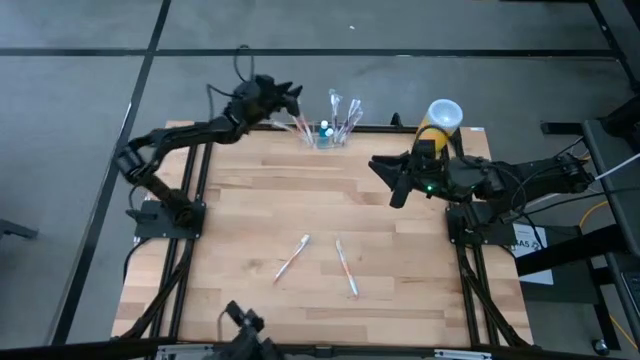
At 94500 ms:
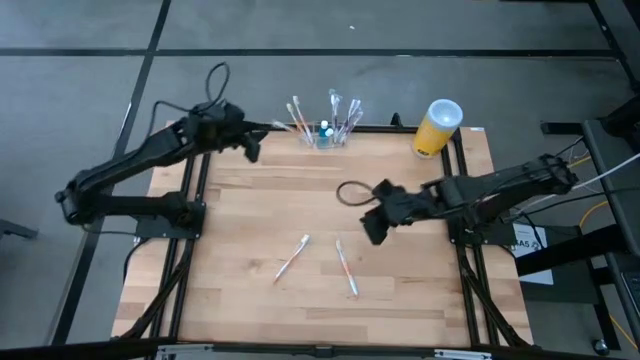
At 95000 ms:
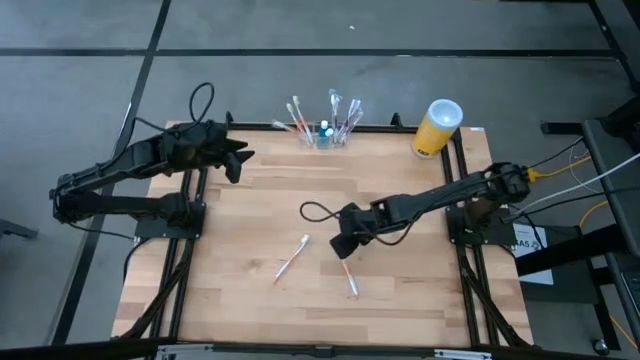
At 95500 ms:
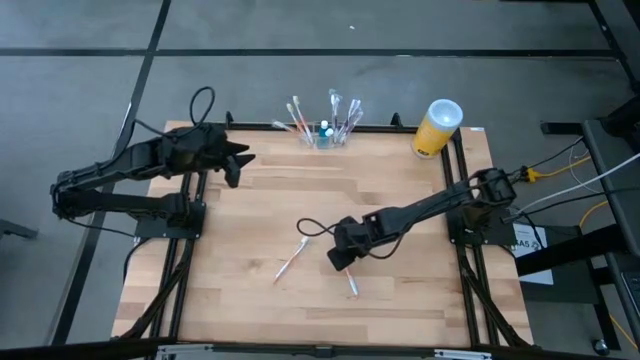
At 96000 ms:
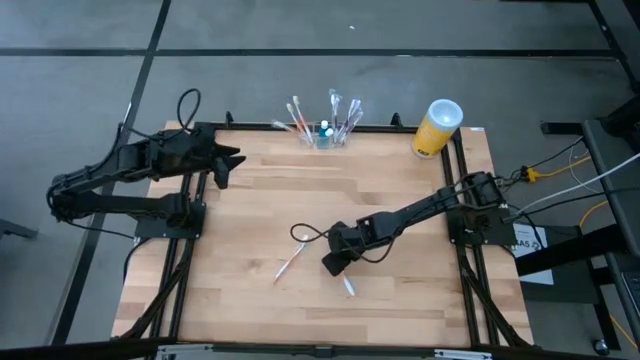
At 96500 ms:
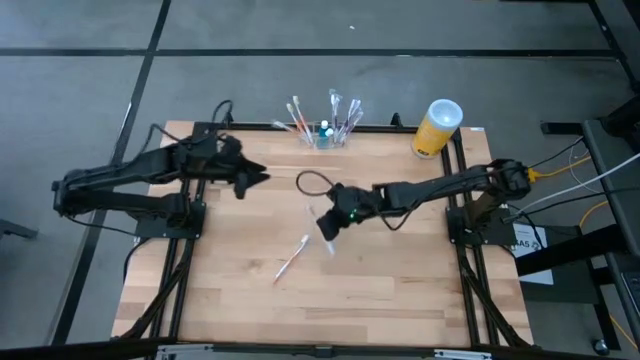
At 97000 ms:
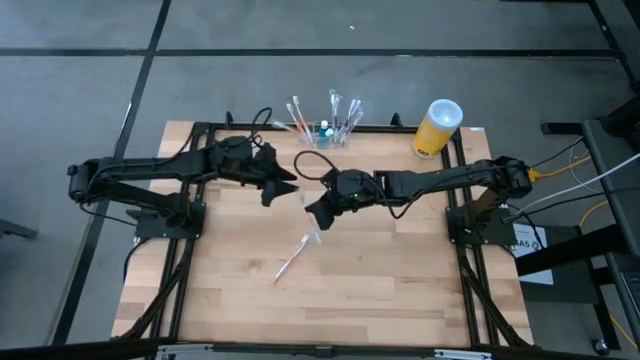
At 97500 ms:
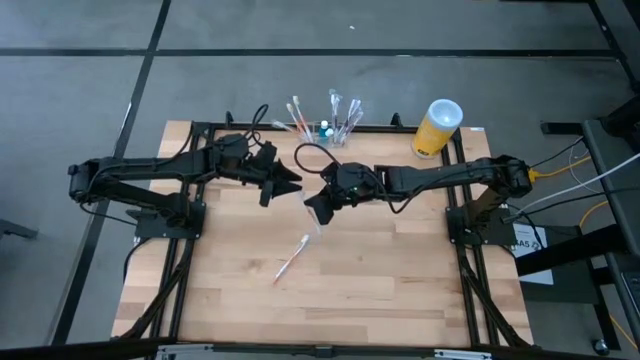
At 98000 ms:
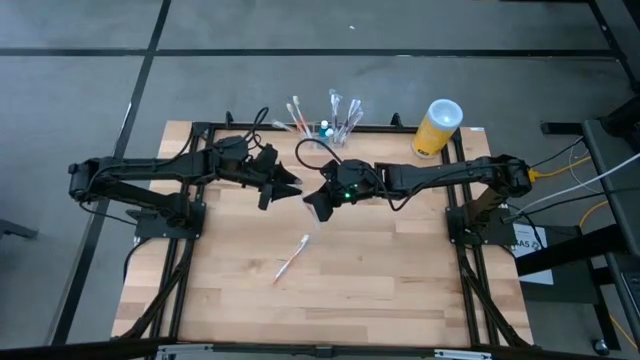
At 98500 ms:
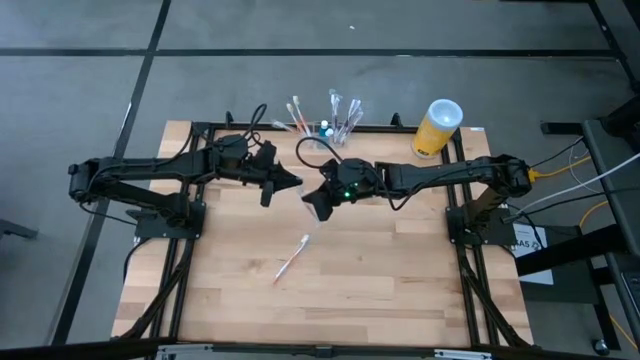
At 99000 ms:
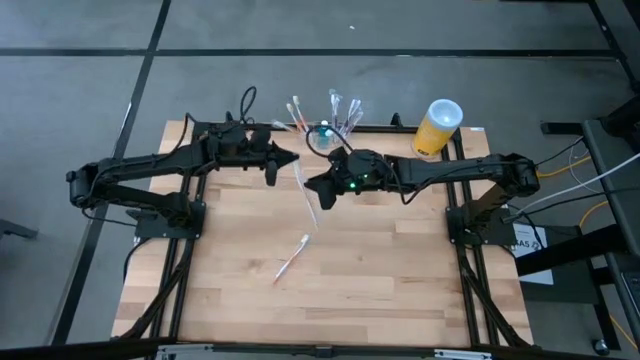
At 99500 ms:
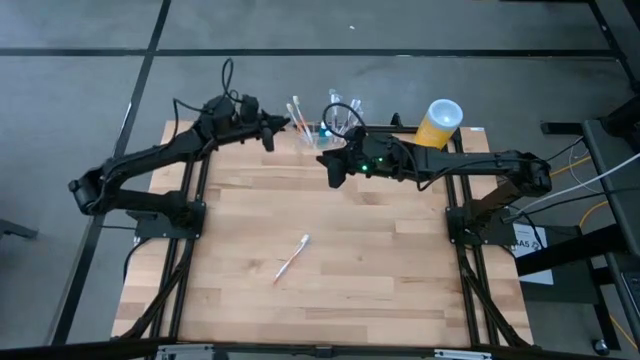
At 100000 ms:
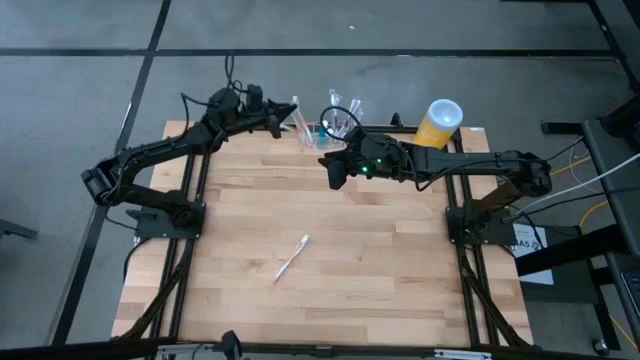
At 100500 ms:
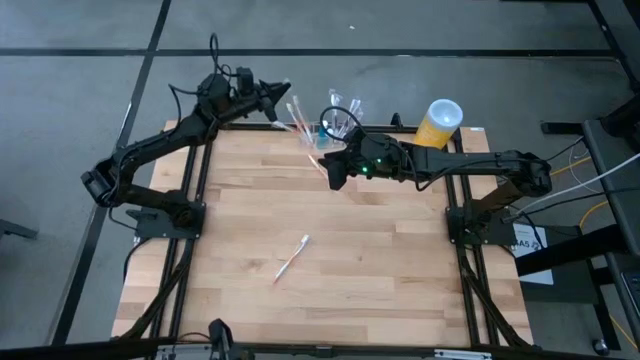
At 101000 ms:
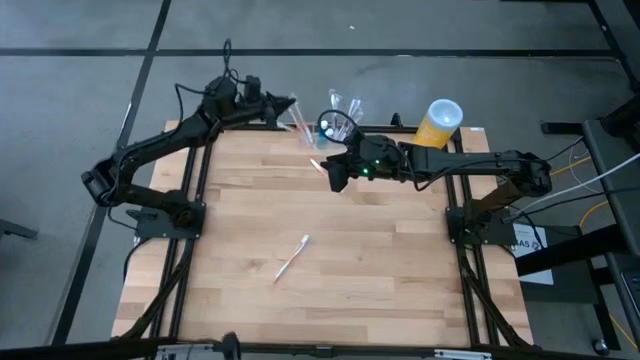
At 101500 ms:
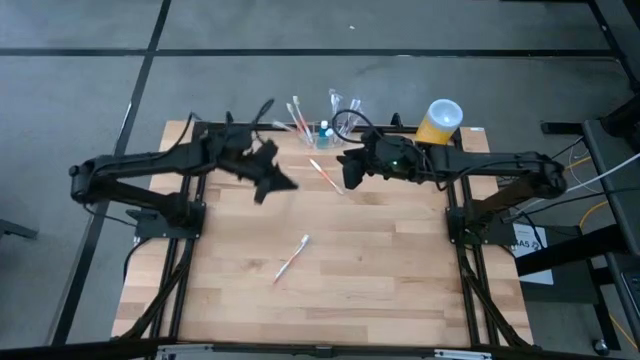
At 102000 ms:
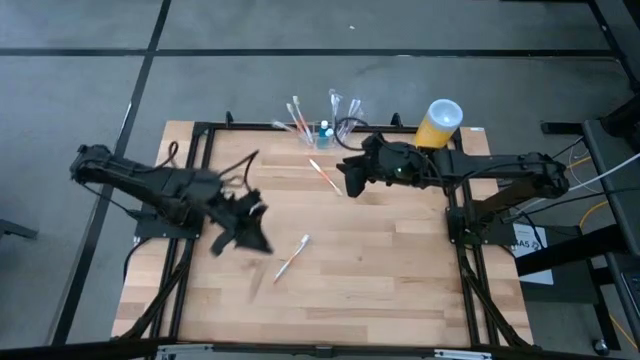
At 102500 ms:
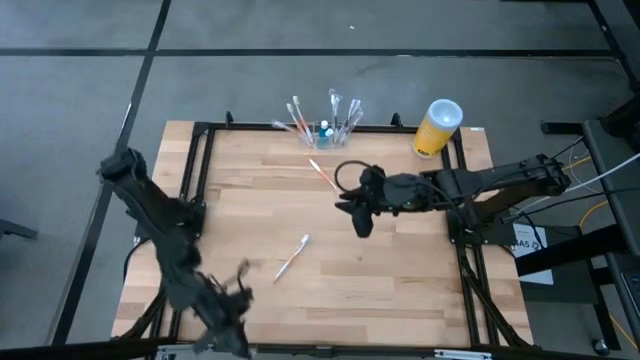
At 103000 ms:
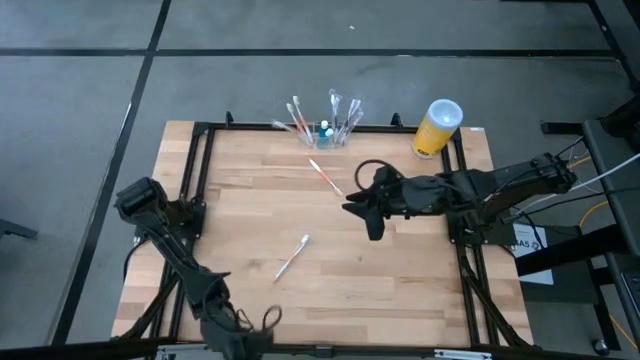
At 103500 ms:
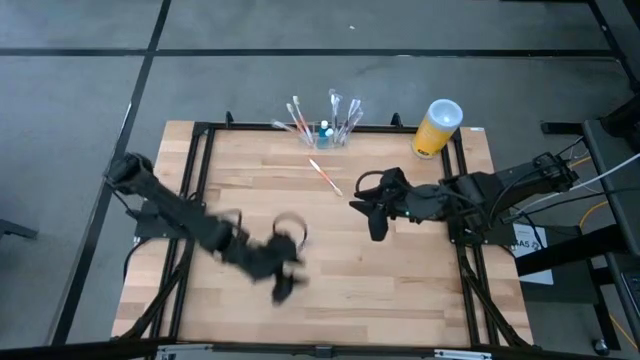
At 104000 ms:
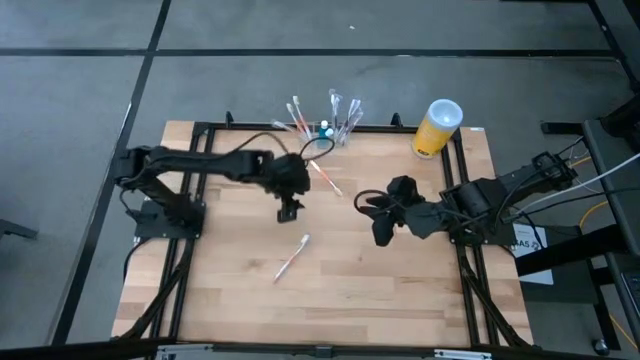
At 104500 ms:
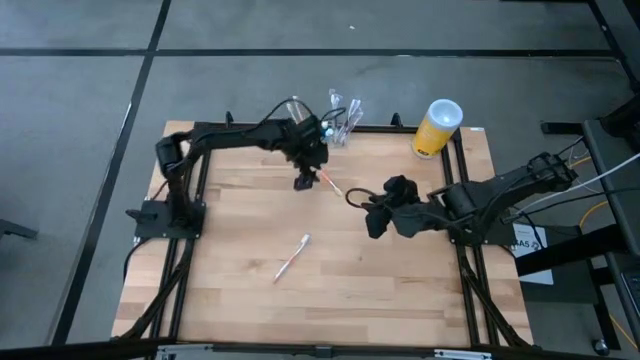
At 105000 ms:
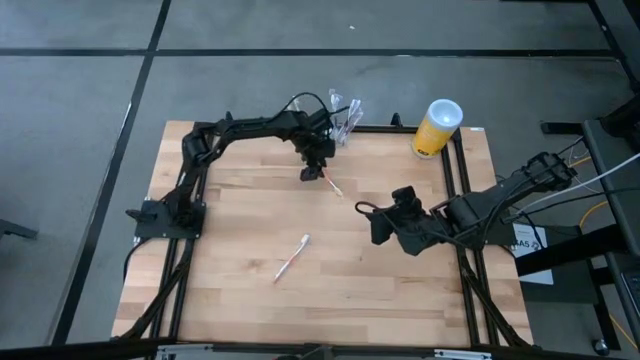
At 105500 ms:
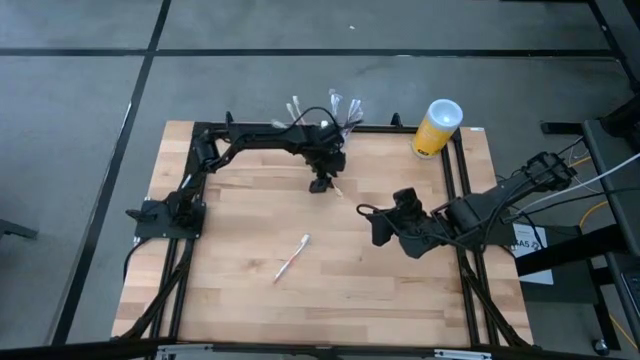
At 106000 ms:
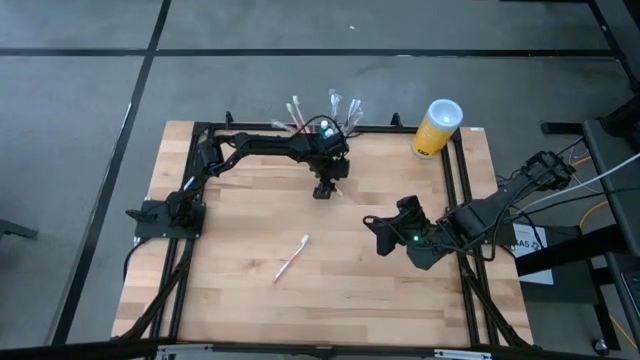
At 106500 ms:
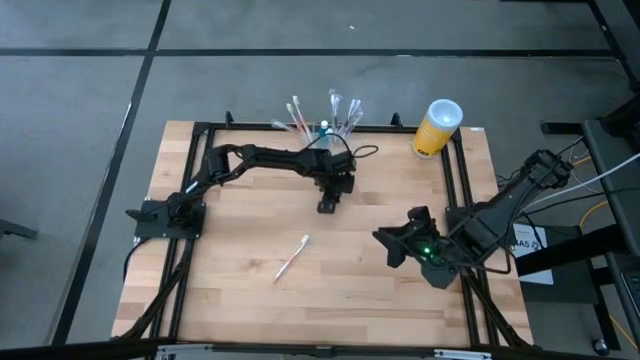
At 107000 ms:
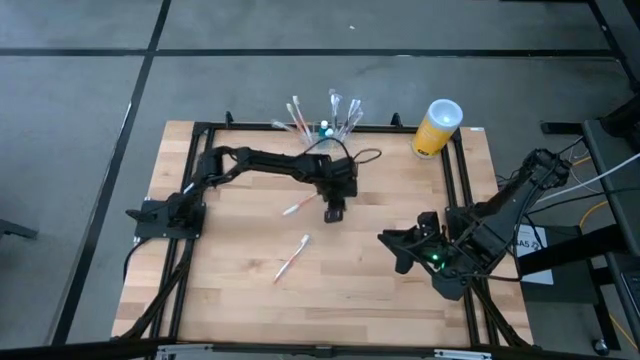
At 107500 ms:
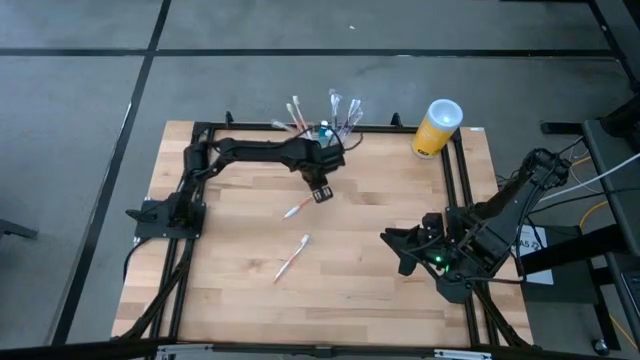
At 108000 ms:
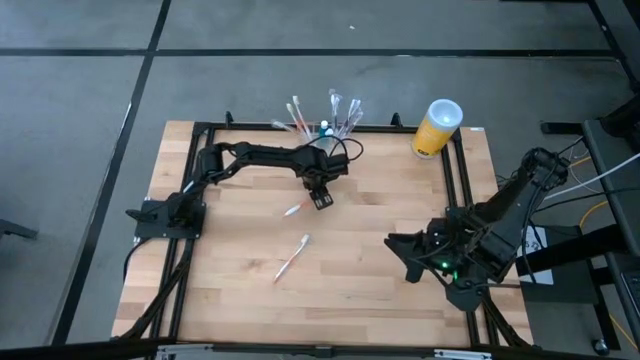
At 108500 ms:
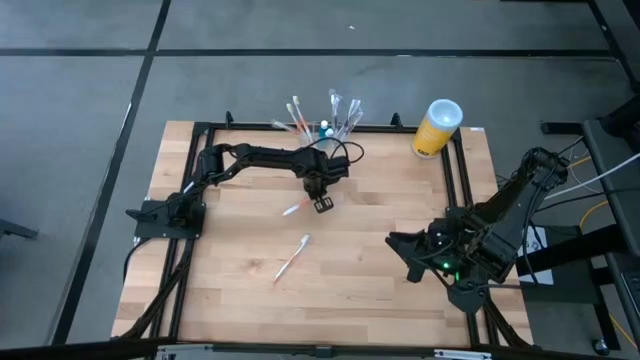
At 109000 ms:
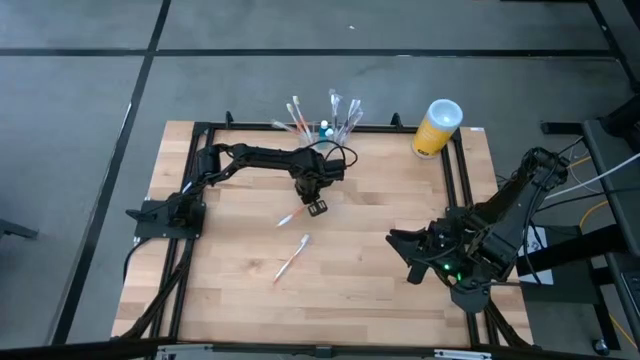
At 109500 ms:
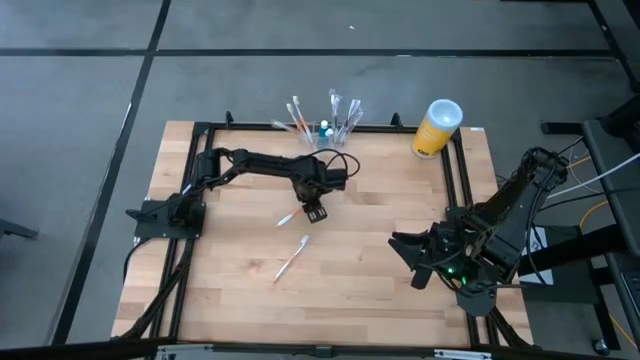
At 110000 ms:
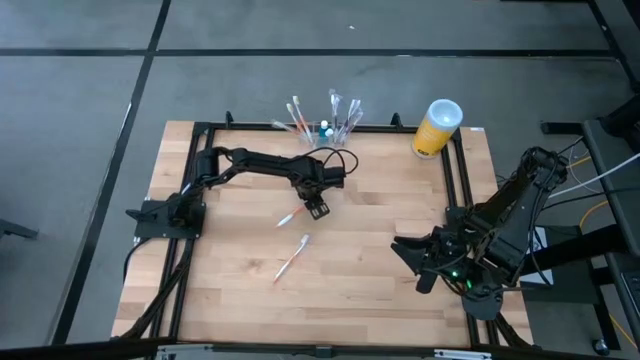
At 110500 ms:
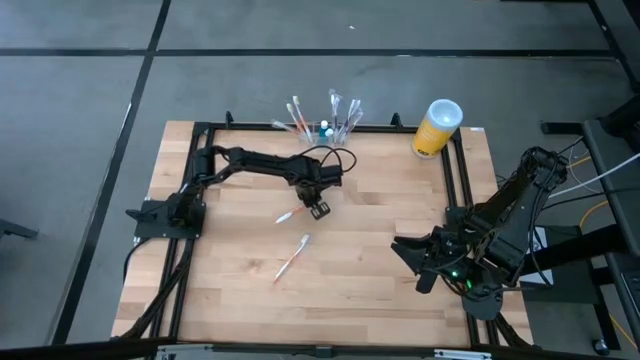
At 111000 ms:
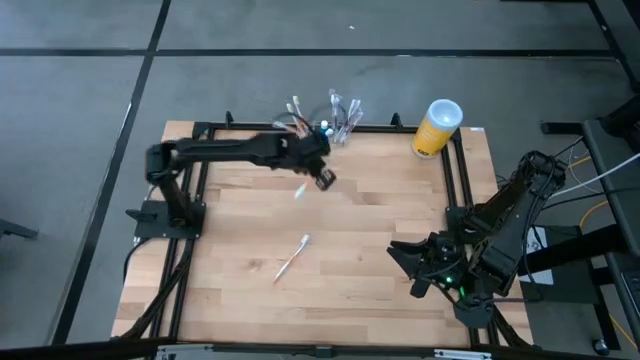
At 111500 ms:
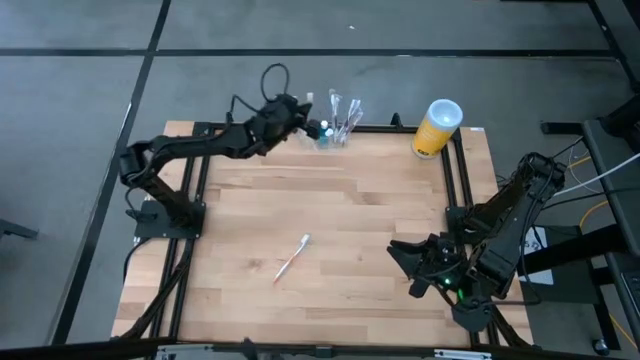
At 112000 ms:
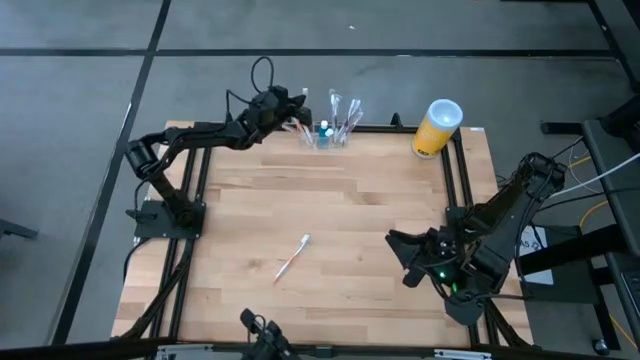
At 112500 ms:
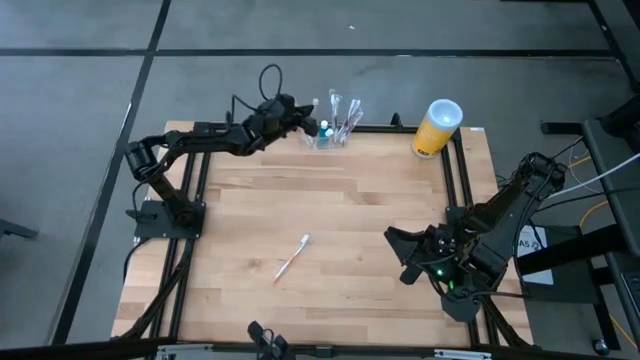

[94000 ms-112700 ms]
Task: Pick & Place toothbrushing station
Put the orange toothbrush into the transparent organizer

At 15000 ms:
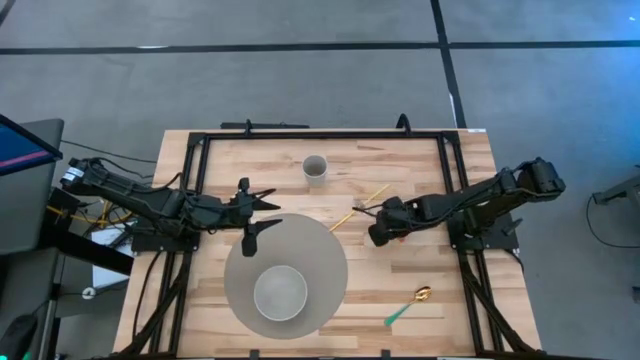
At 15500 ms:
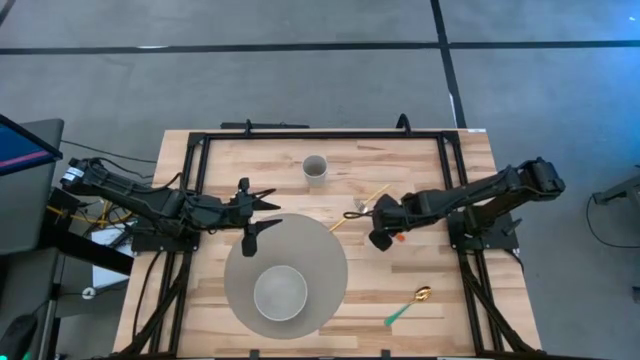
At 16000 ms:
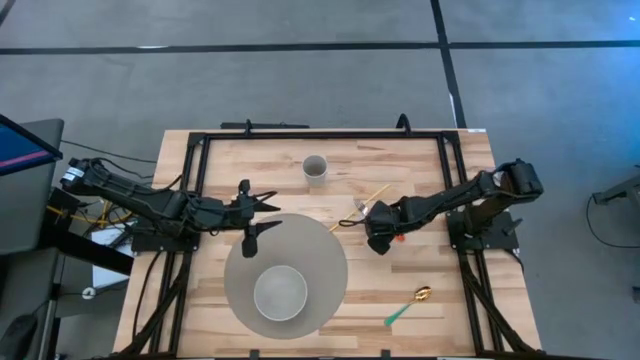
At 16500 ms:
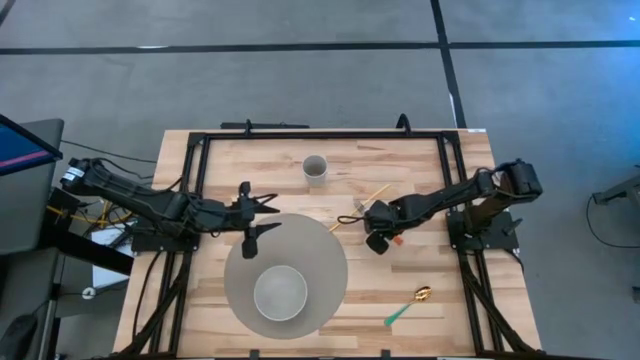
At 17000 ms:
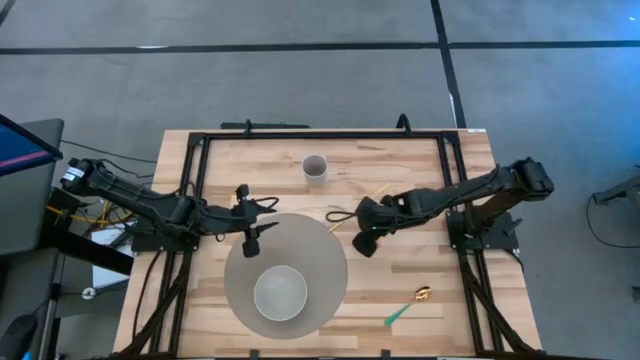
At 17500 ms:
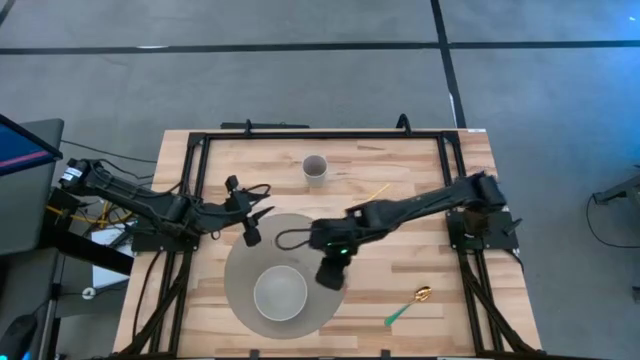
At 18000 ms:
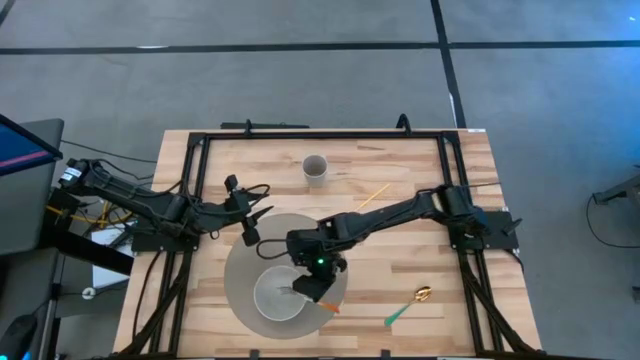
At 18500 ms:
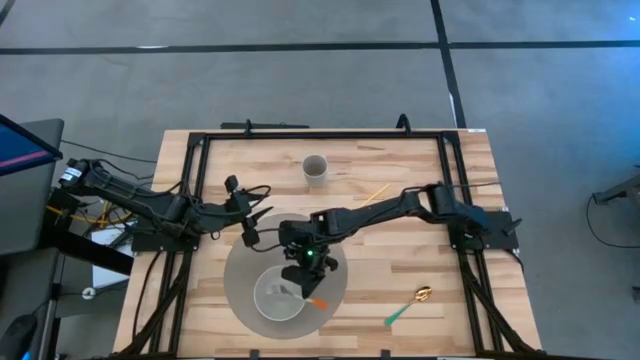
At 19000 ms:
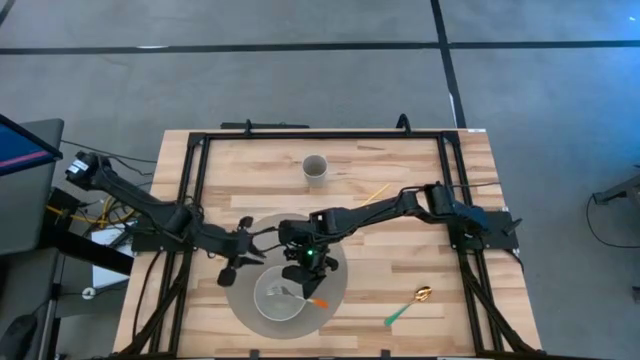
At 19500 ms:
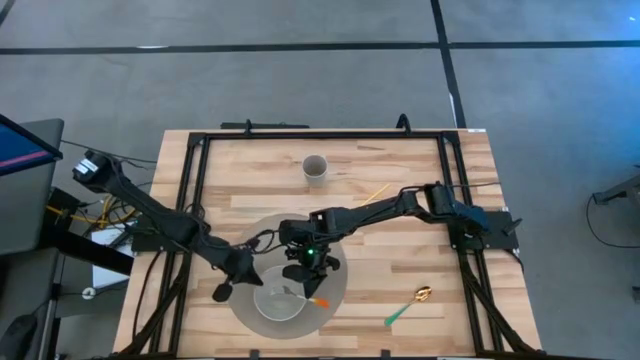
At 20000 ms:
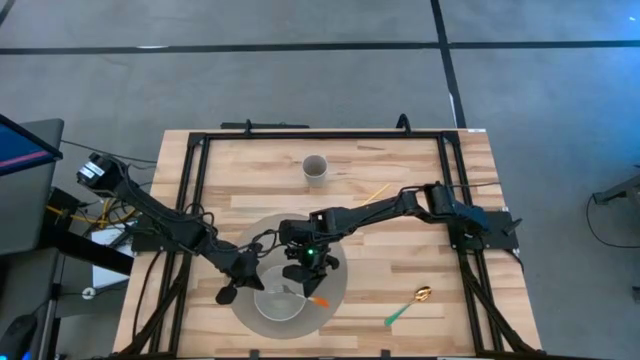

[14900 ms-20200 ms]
Task: Pick & Place Utensil
Put the orange fork into the white bowl on the mat
